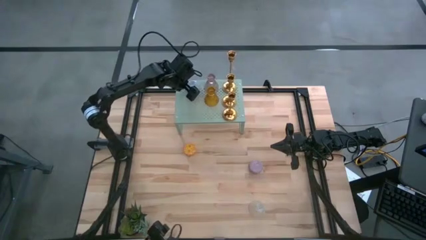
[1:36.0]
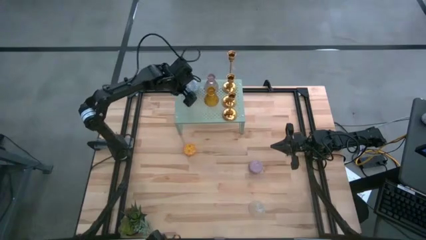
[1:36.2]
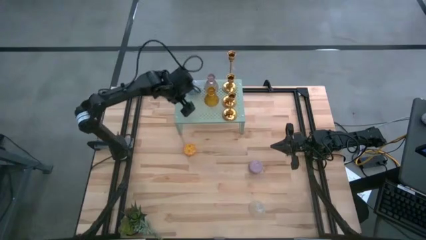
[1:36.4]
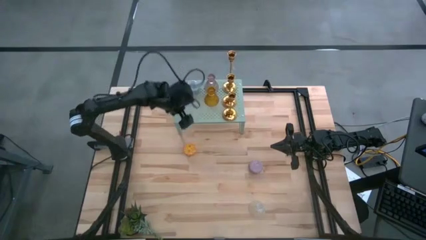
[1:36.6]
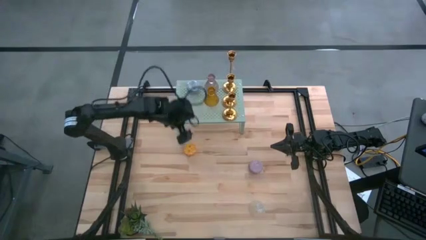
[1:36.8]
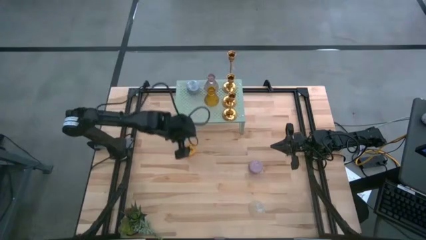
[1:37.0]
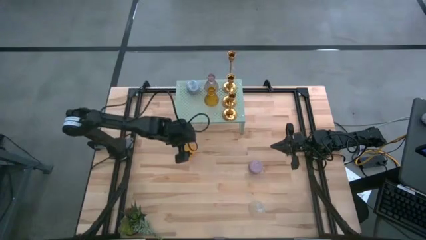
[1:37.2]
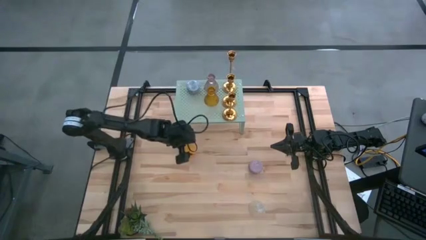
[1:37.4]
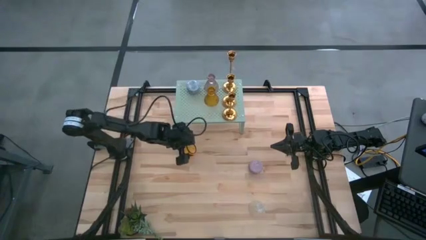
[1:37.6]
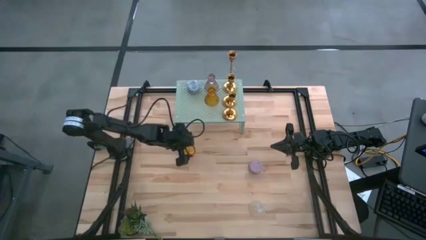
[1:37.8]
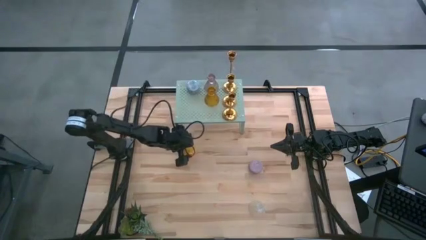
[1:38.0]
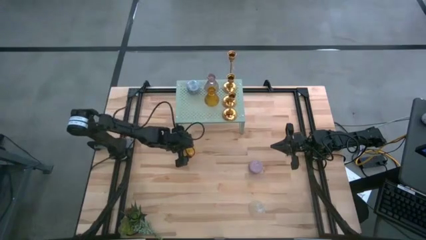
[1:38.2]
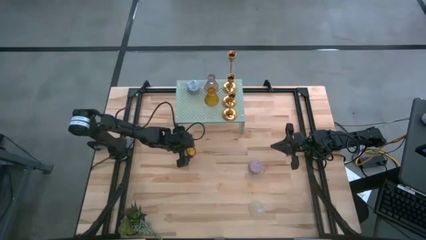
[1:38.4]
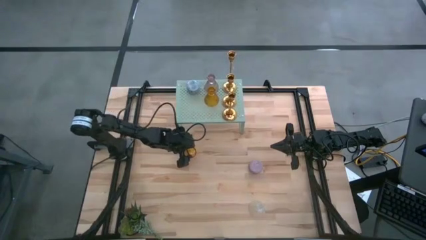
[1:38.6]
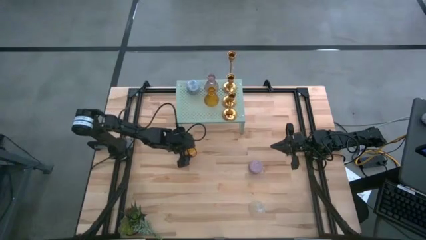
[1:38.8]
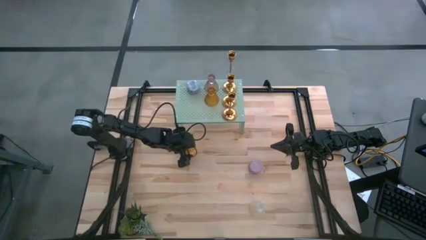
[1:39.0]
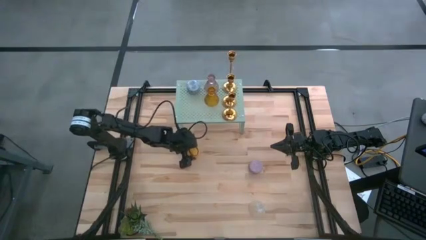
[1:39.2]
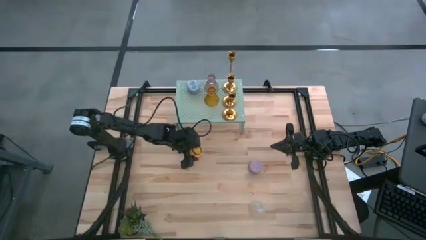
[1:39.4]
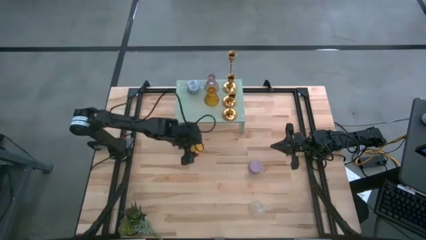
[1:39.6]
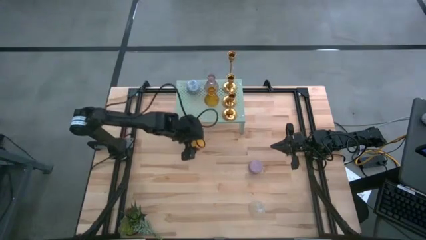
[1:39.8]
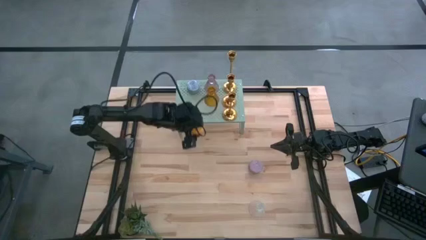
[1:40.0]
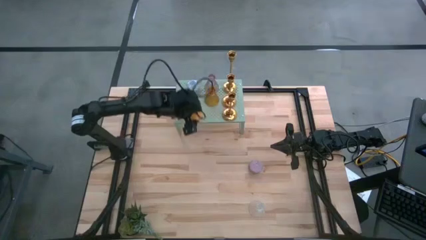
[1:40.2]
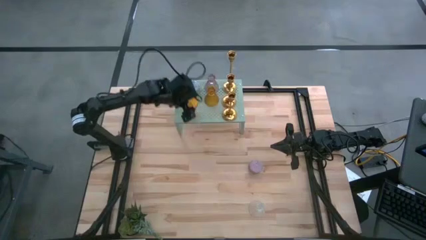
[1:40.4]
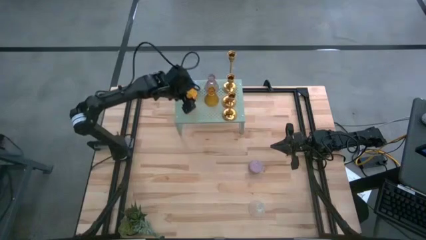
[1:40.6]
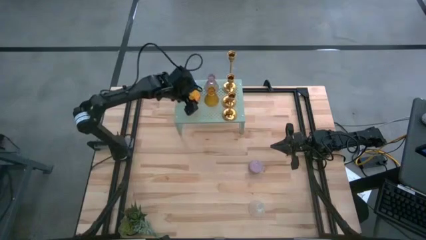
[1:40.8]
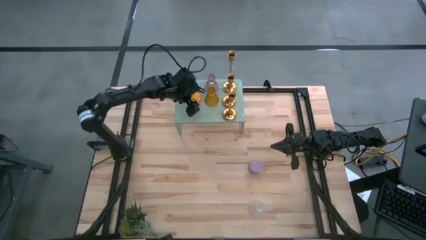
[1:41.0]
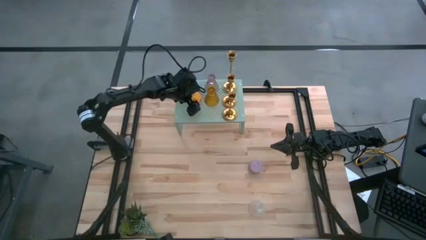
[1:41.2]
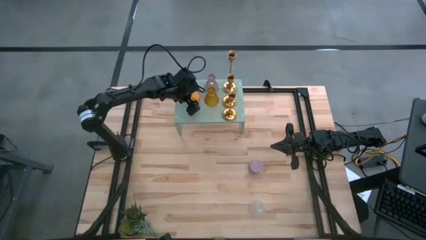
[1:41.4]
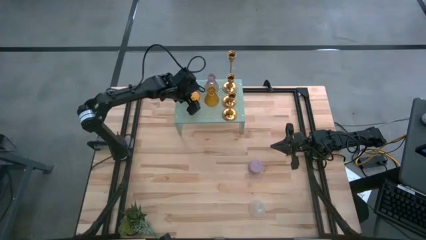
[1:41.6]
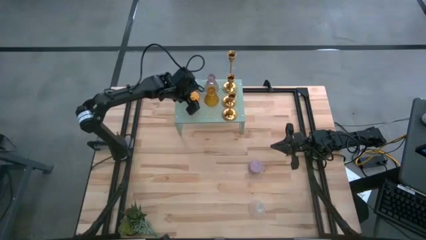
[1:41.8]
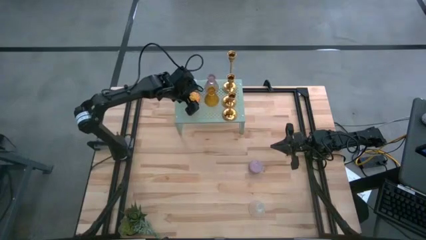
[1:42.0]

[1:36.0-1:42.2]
Task: Pick & Place candle stick holders
Put the yellow patterned scented candle on the shelf aligned with the yellow patterned scented candle

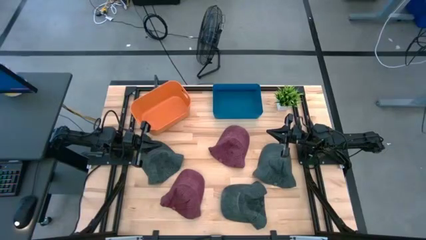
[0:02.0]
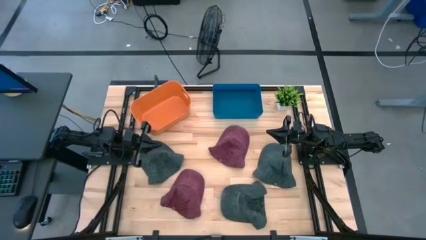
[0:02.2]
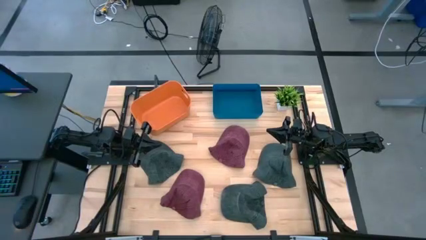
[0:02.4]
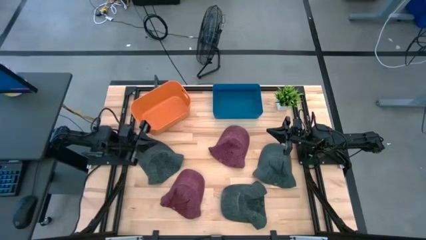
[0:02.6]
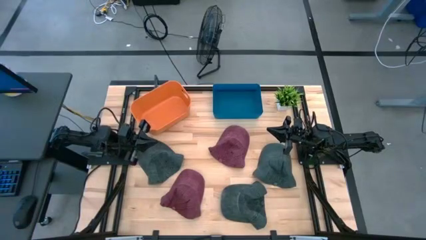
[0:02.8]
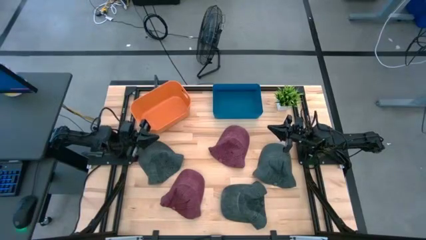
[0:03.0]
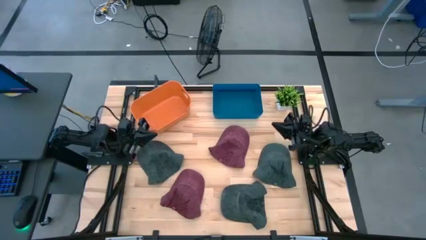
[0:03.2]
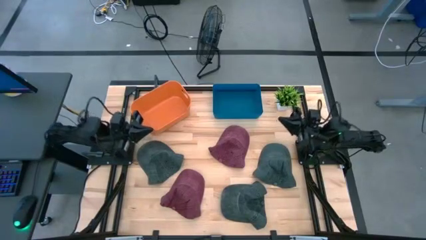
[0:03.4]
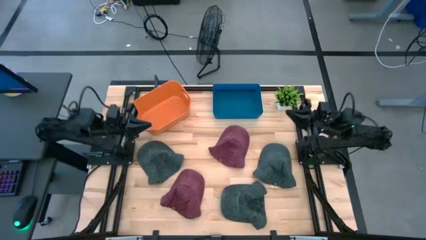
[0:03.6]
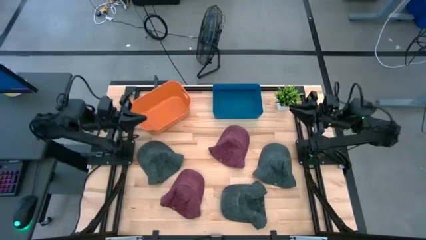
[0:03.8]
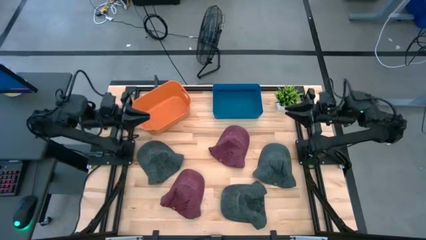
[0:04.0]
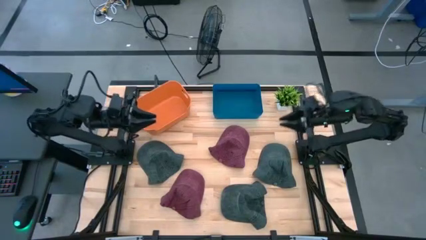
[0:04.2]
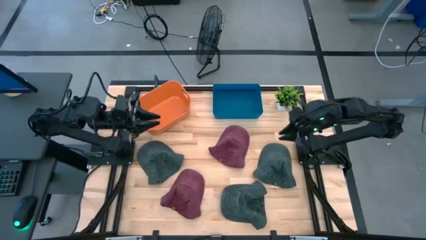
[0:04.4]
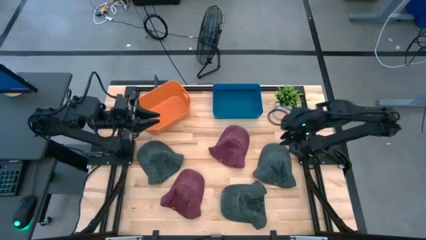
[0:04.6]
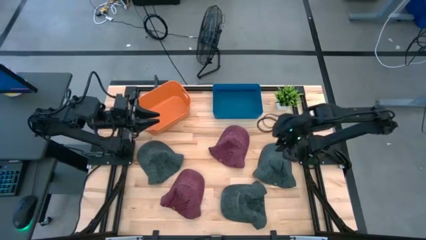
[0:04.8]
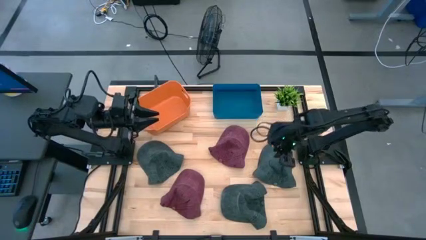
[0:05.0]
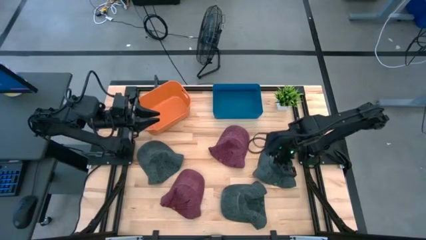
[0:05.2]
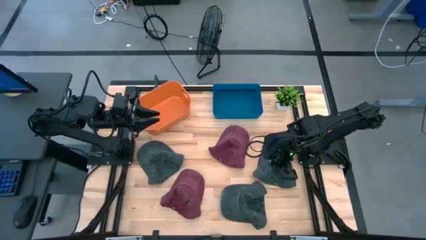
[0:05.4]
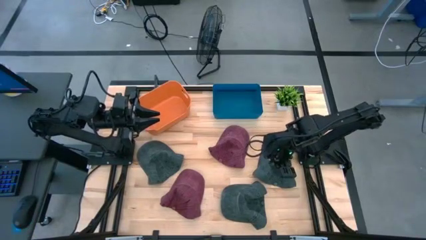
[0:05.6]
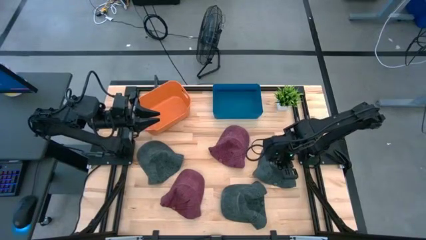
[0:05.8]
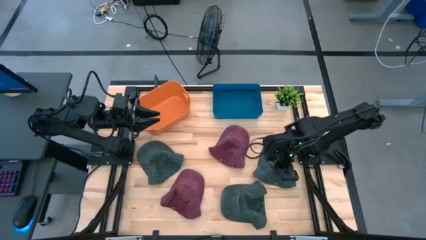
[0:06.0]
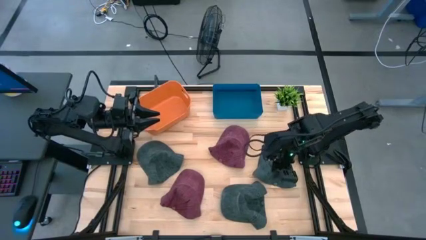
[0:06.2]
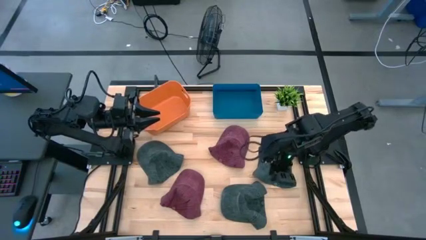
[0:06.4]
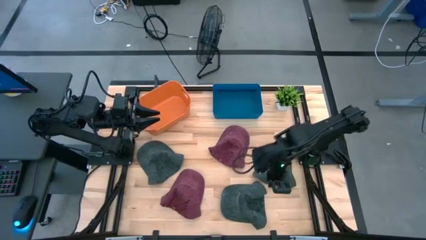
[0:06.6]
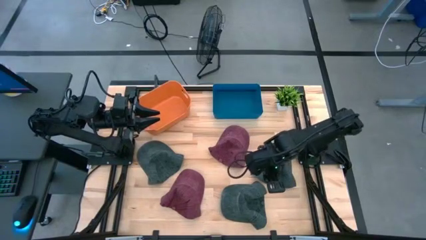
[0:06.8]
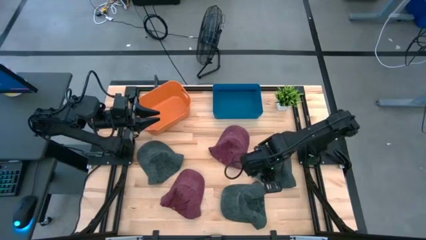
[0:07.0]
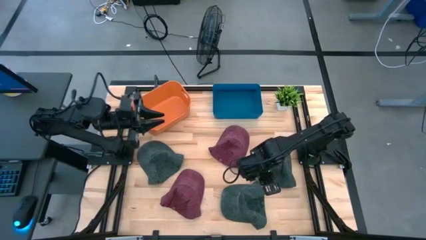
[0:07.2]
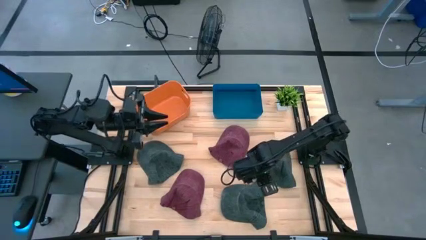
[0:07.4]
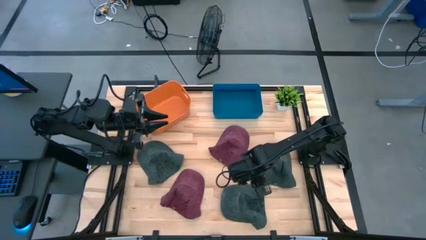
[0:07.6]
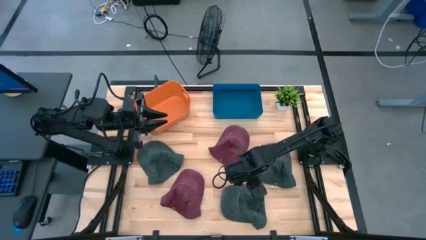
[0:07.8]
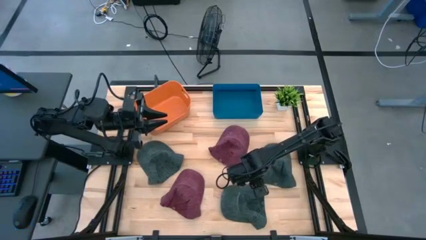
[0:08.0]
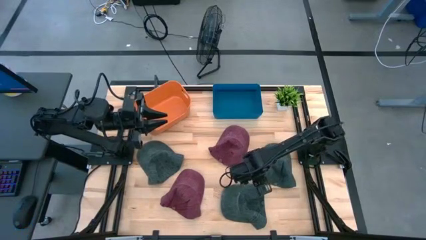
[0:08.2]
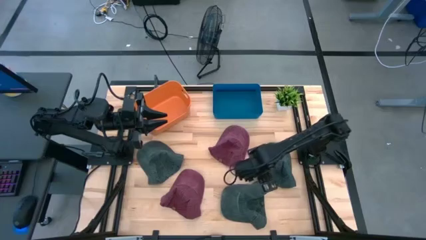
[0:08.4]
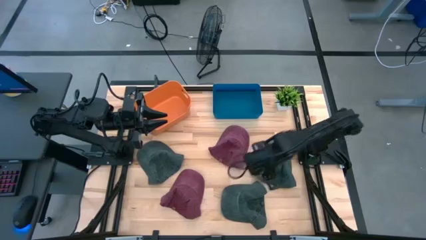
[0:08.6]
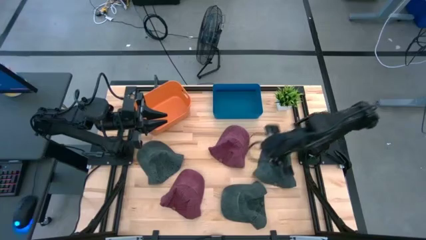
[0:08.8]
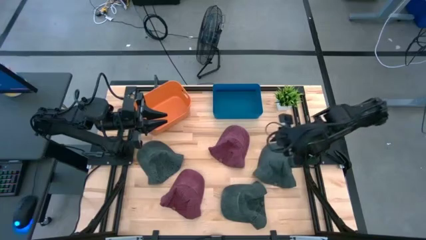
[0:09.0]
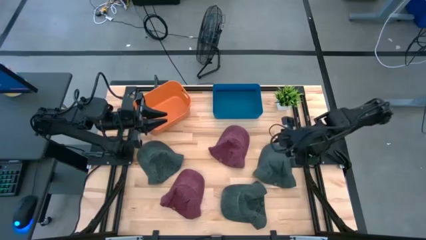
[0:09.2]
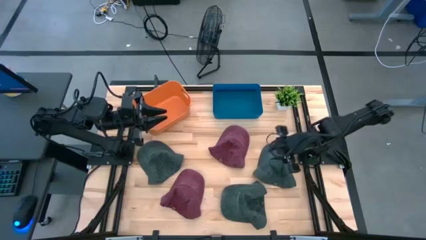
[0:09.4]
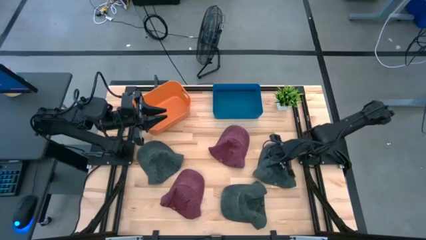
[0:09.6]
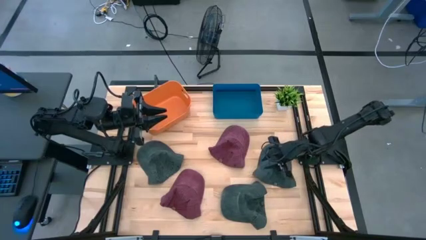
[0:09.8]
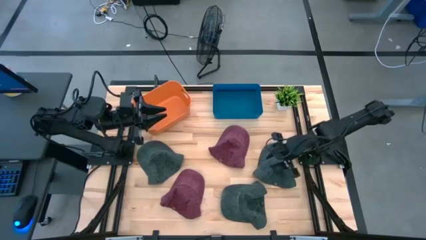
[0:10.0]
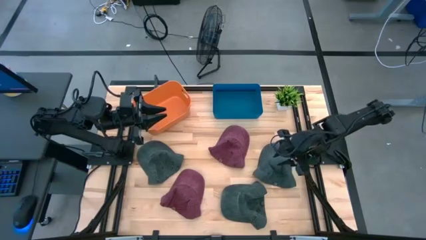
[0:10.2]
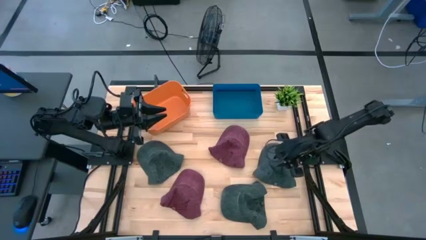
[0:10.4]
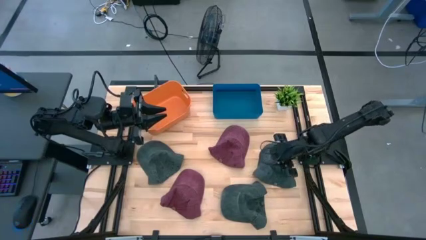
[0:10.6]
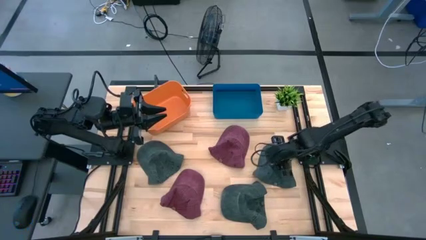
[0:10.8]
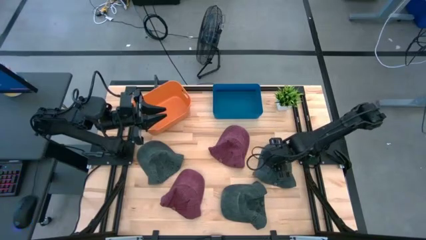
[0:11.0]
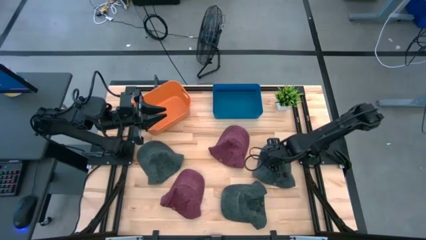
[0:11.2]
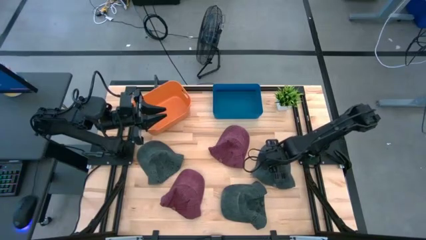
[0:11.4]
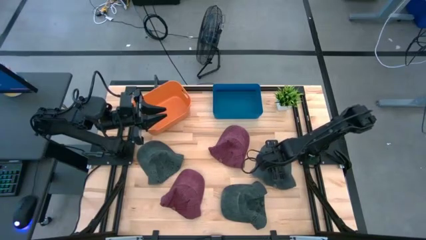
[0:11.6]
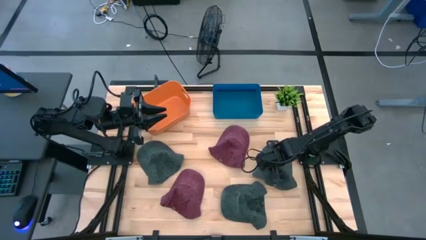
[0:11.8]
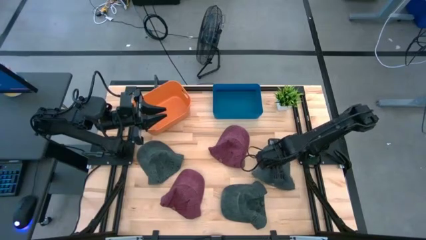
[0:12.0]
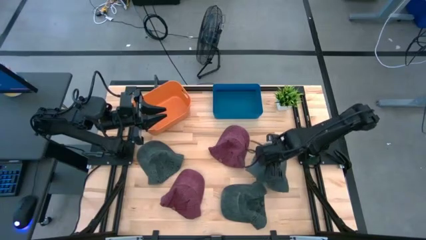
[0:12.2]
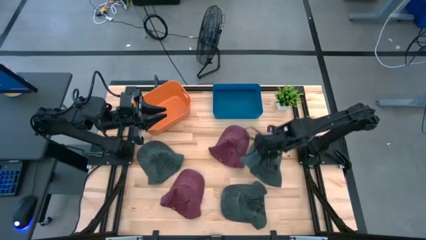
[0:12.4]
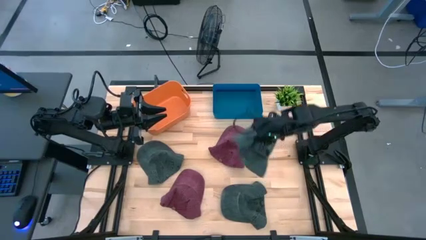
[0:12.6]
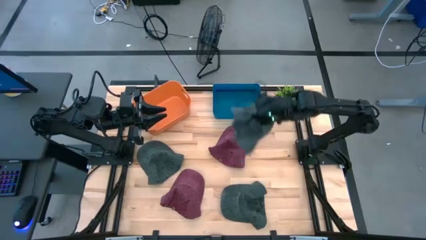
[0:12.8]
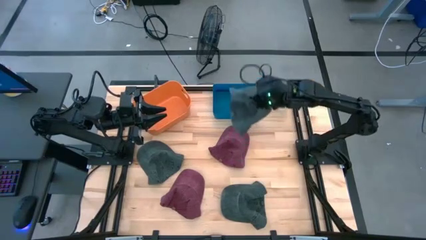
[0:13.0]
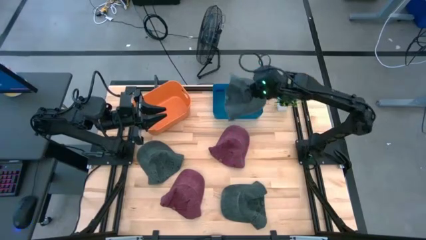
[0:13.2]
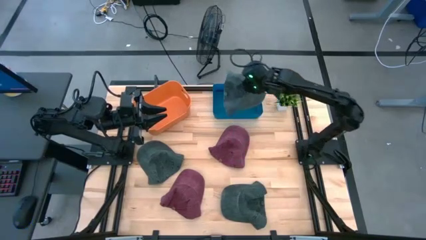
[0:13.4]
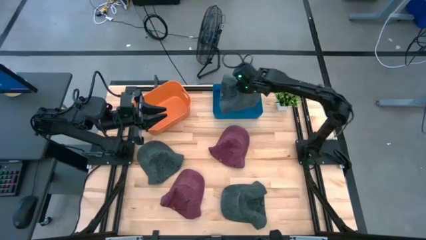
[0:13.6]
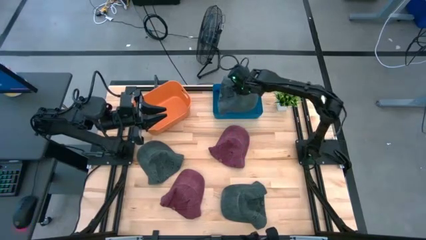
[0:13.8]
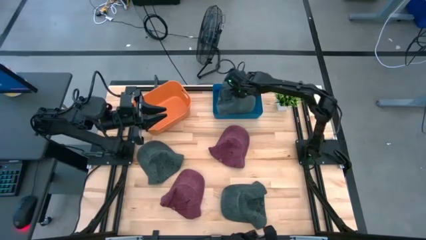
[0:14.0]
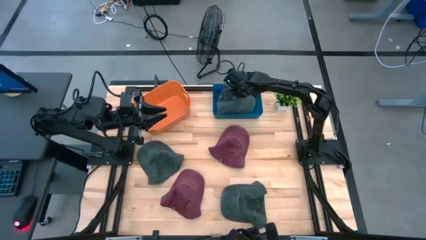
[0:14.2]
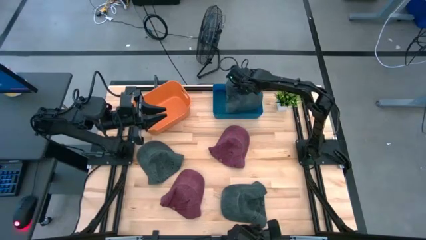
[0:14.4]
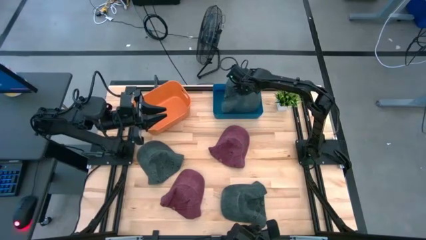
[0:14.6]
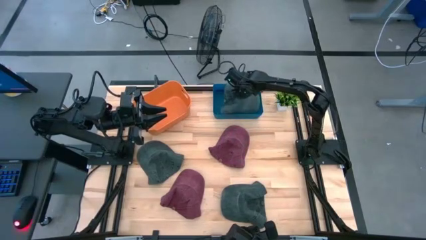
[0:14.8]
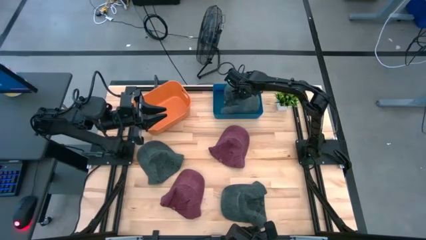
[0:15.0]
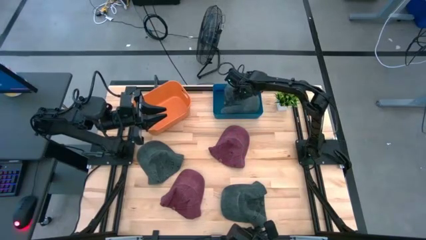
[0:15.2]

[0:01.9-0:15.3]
Task: Pick & Place hat
Put the top right black cap into the blue bin
